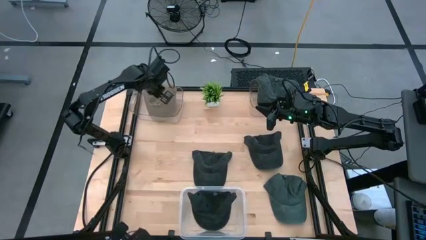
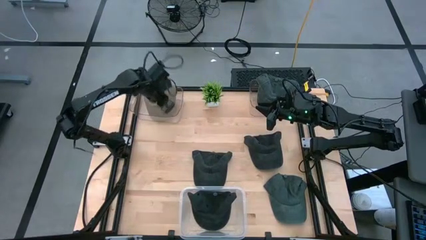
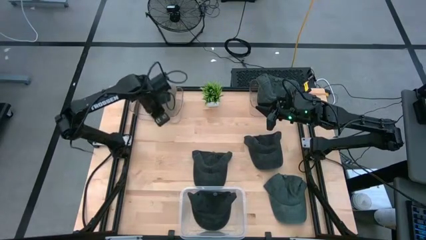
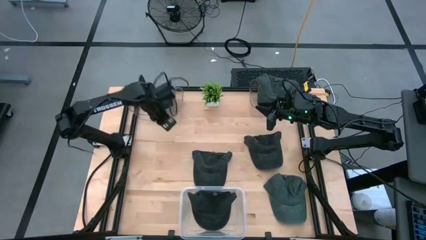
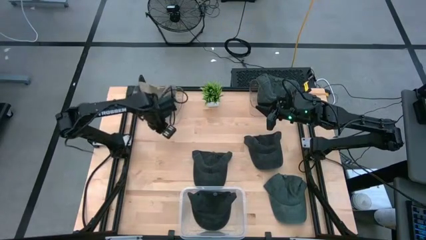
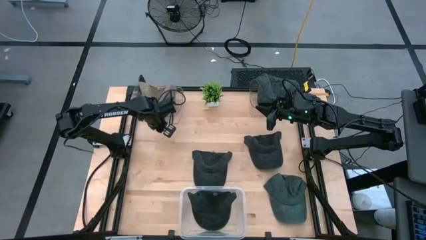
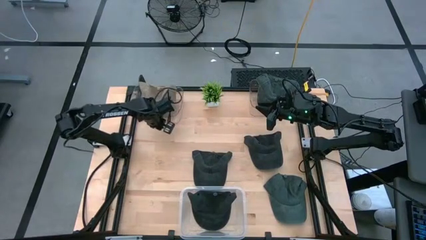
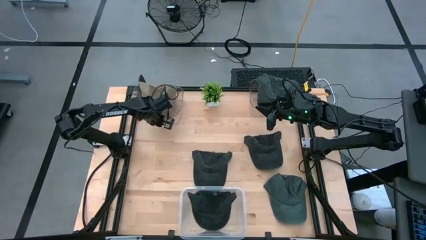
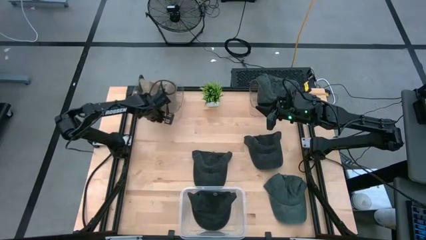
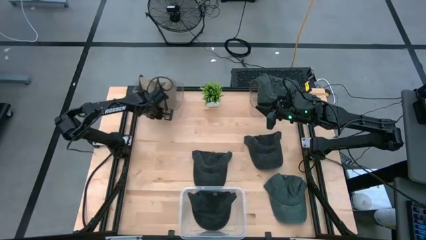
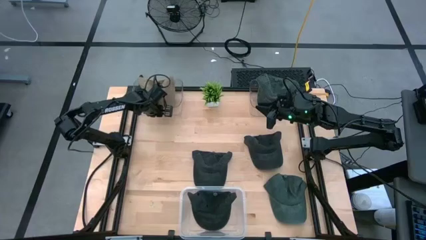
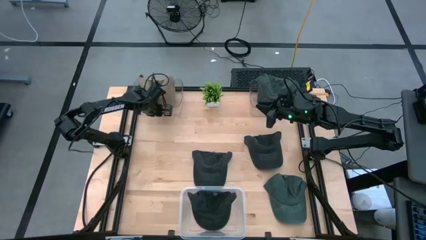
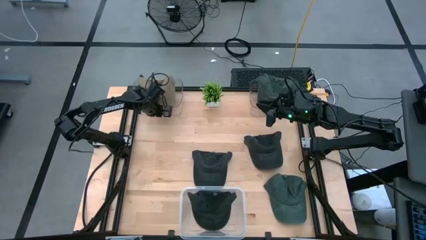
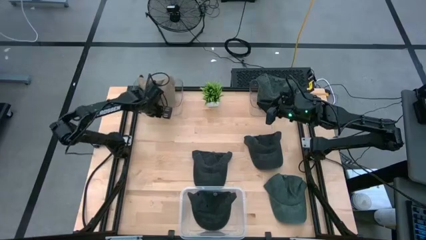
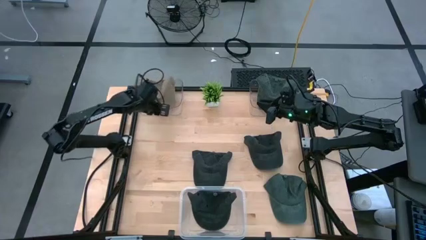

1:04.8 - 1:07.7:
Task: Pick & Place hat
Adjust the left transparent bin

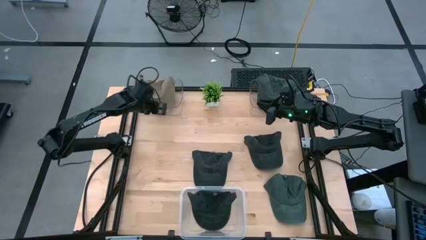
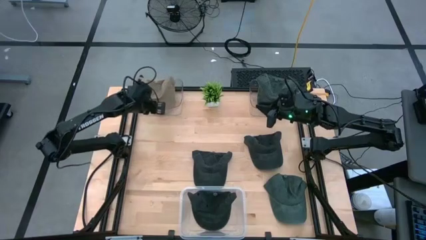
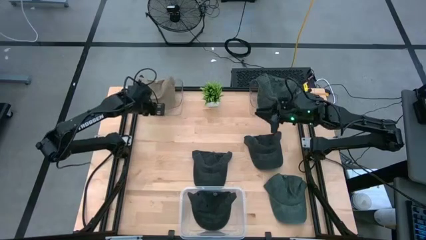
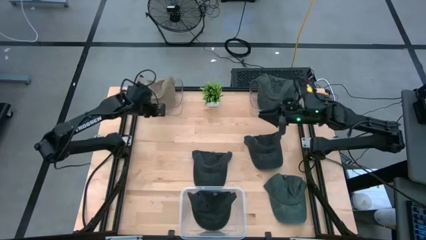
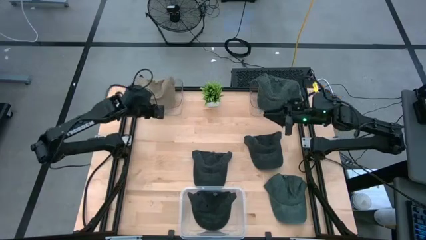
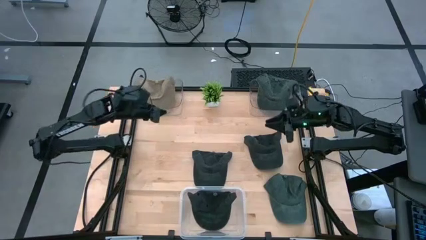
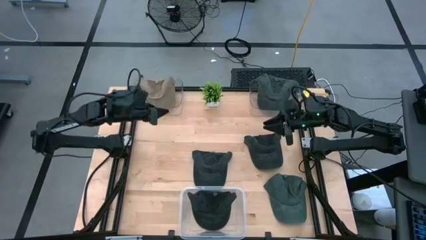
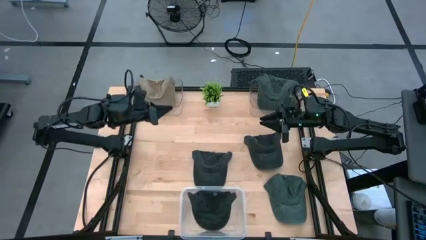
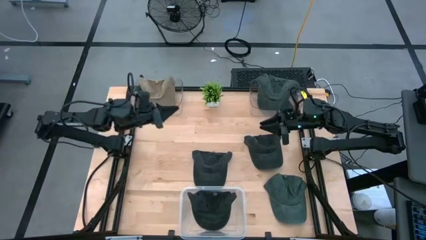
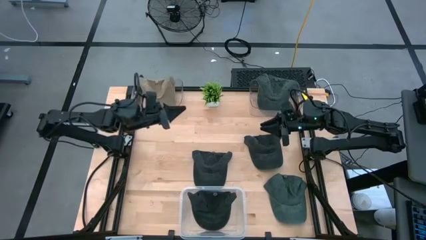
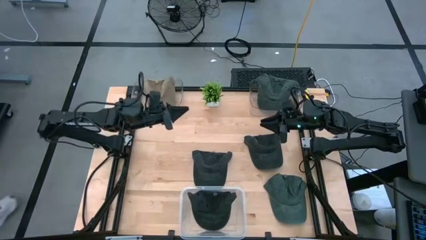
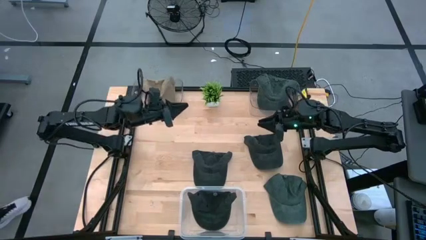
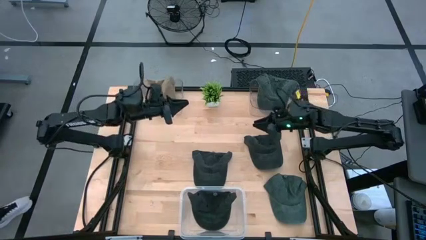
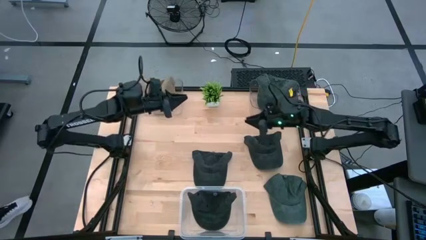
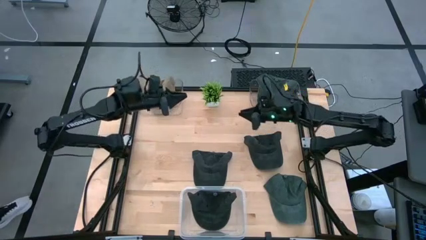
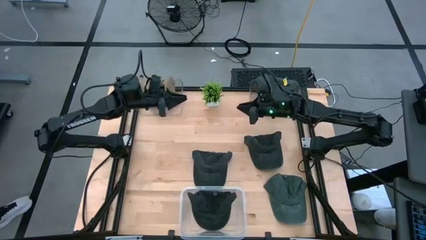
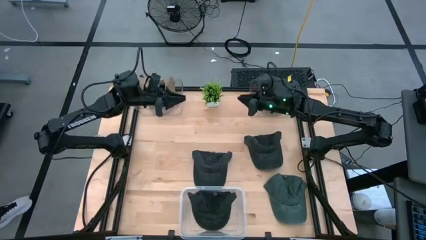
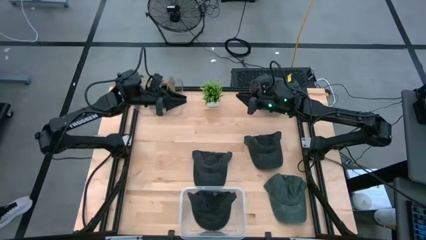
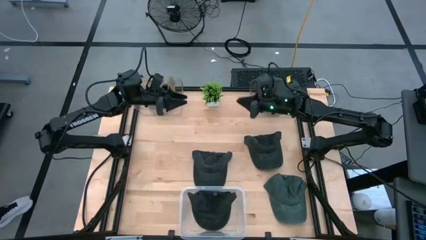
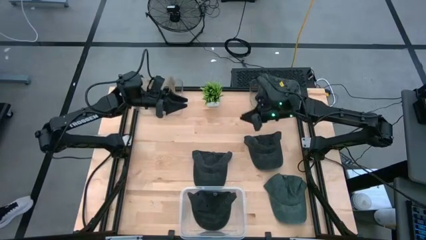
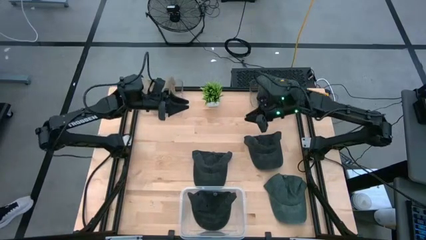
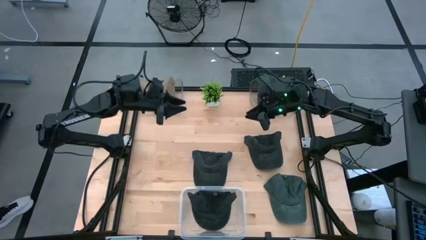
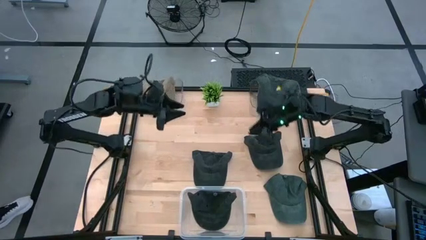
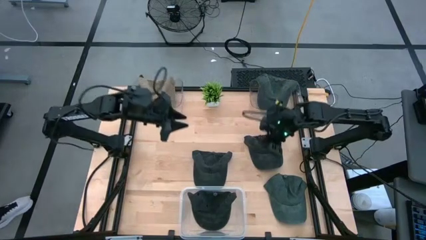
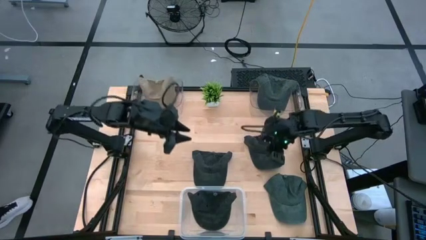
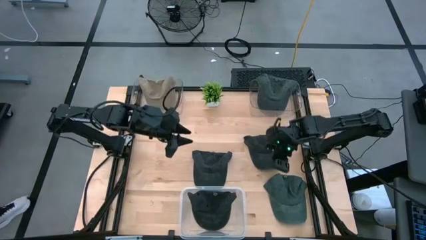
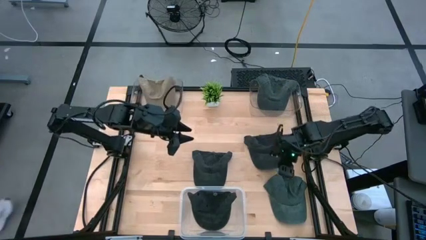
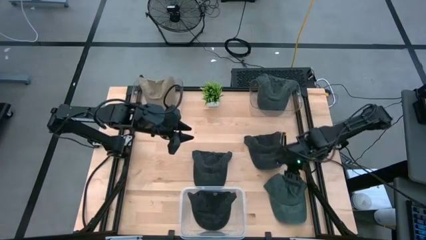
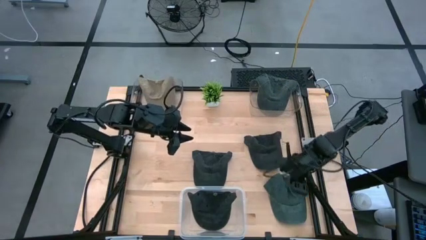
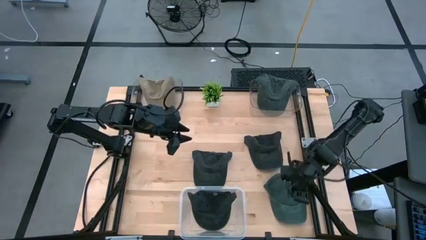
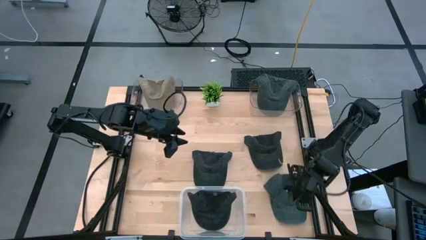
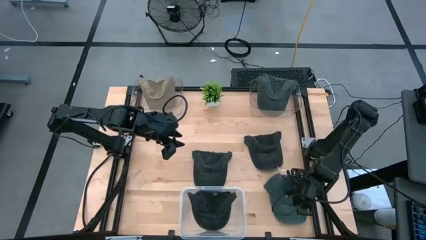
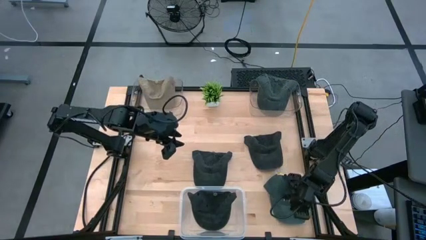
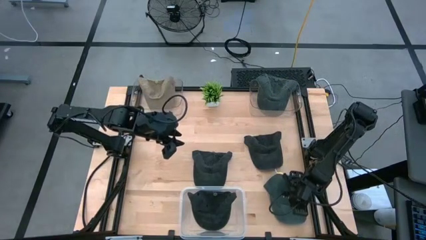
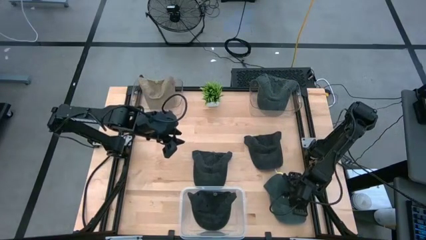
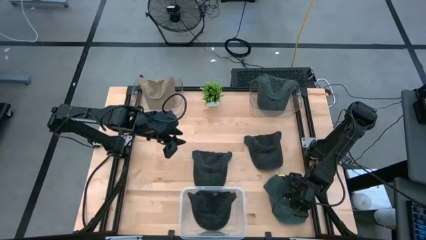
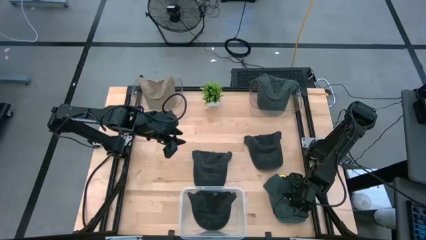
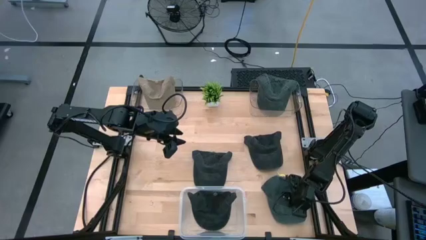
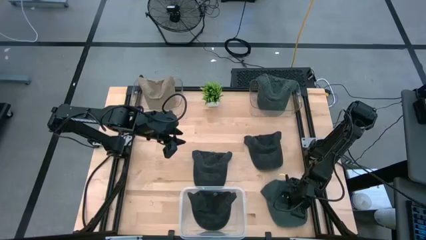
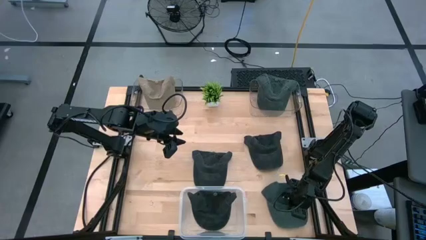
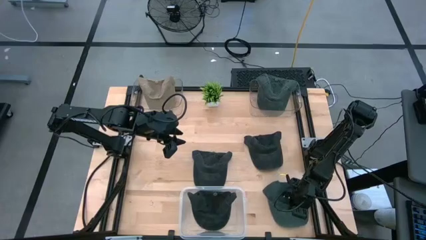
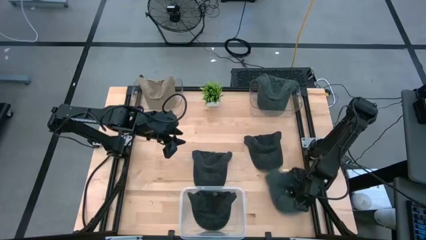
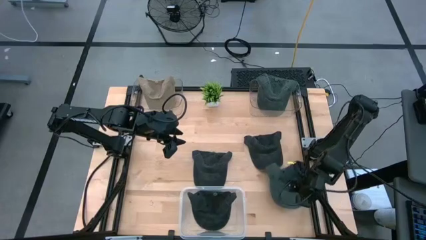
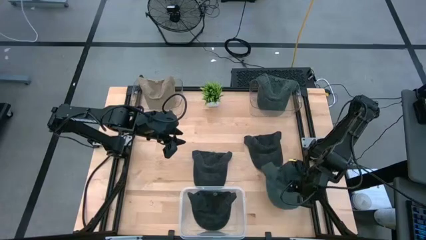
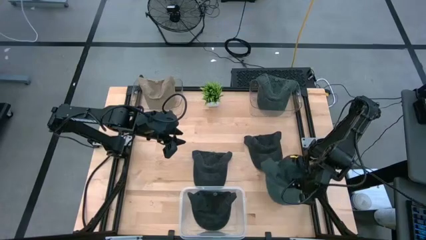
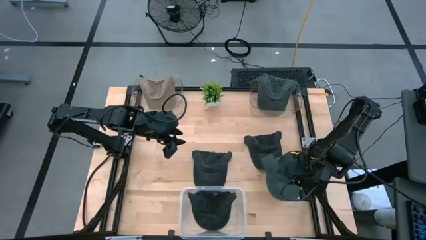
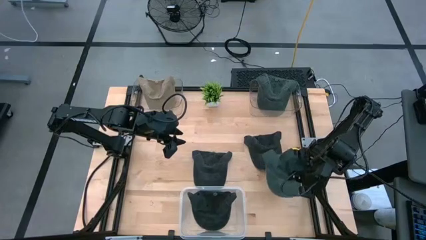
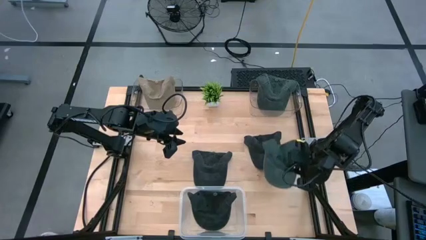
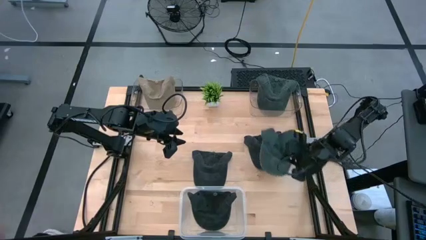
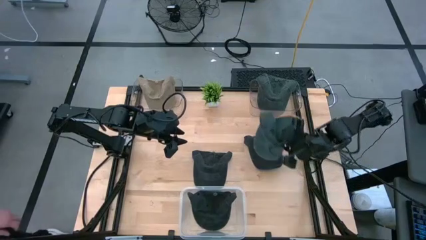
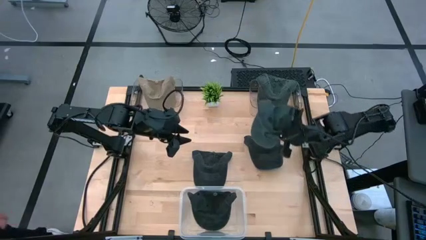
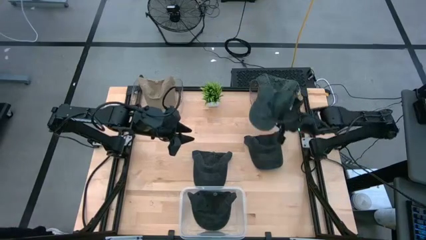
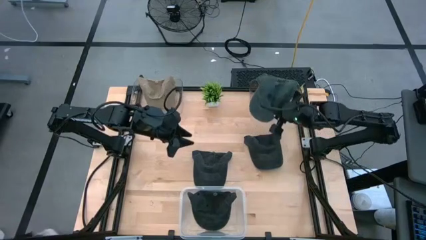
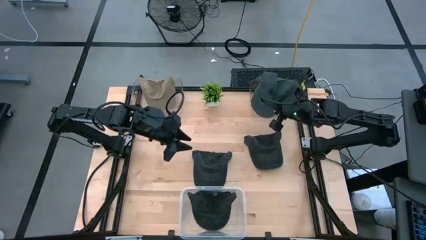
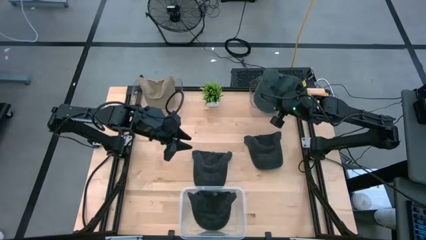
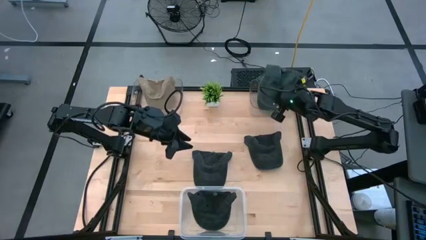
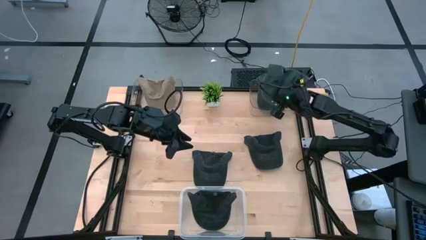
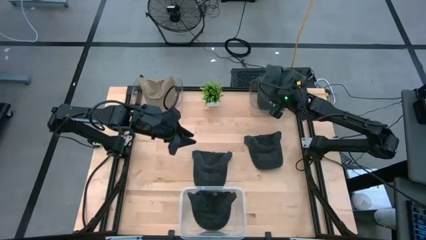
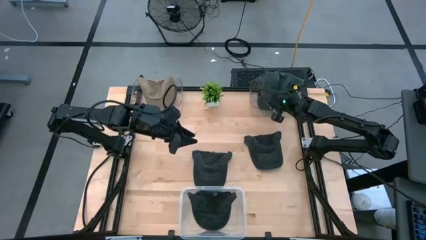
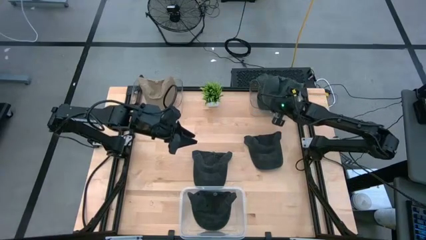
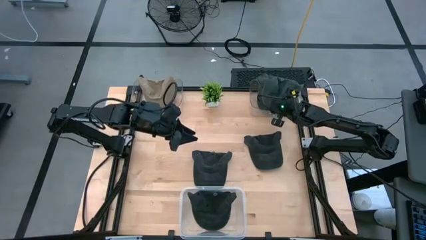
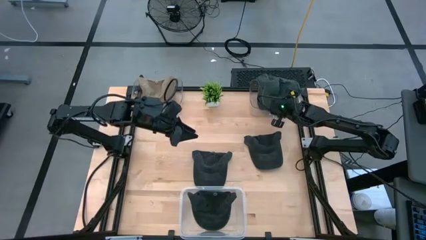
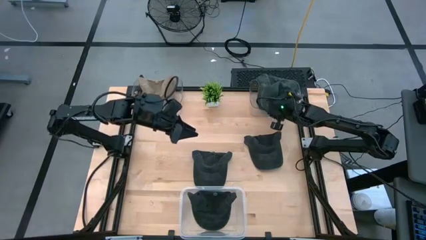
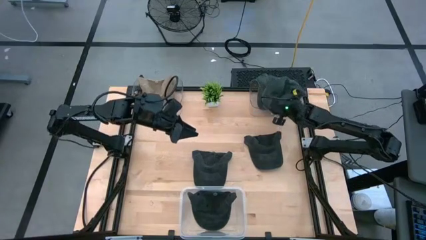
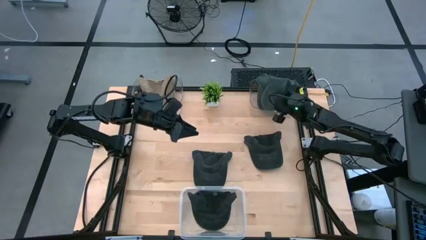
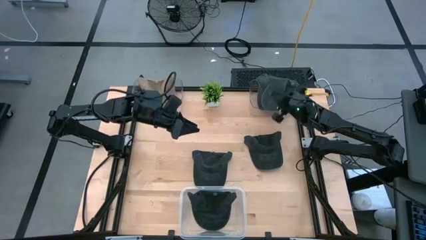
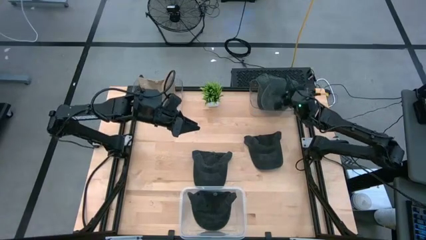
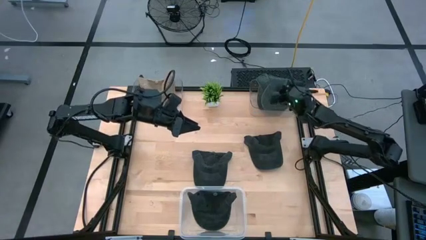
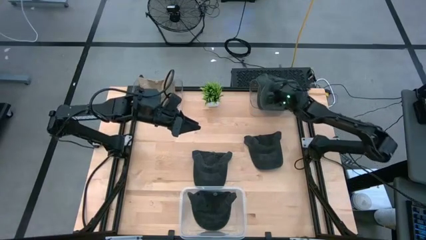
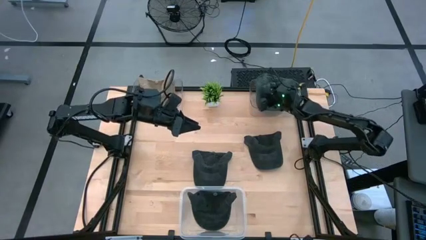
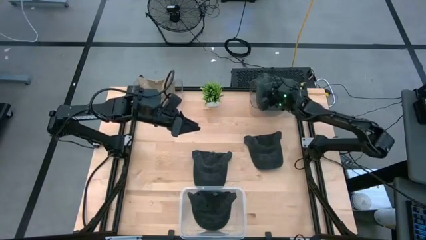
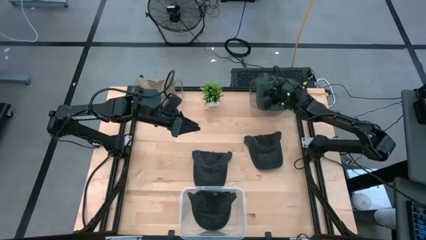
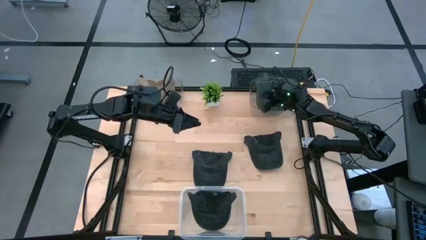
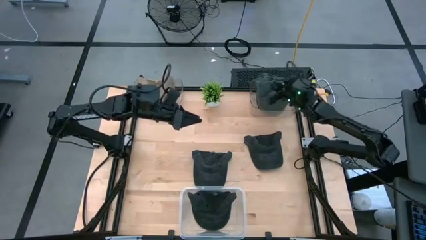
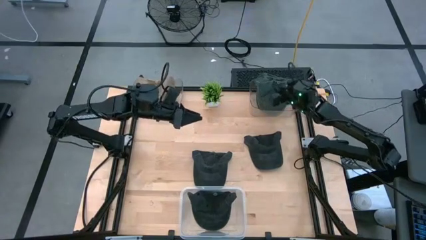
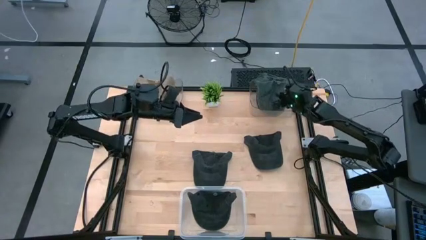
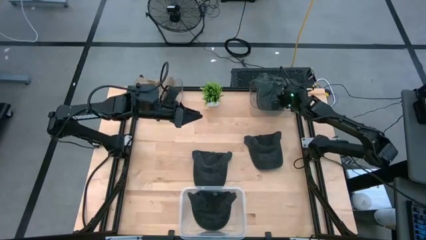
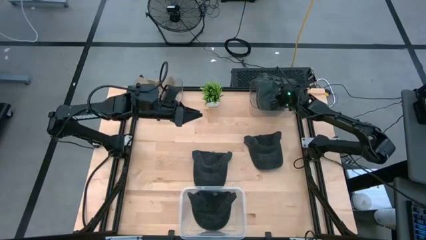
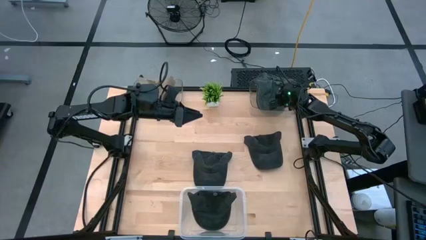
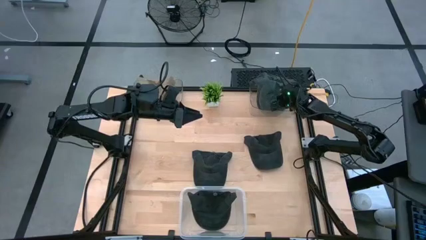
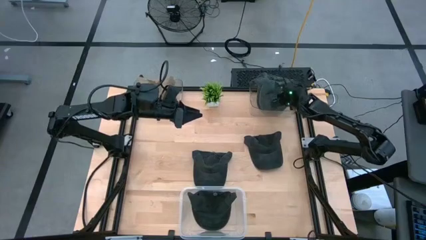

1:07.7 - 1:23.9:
Put the dark gray cap into the right transparent bin
